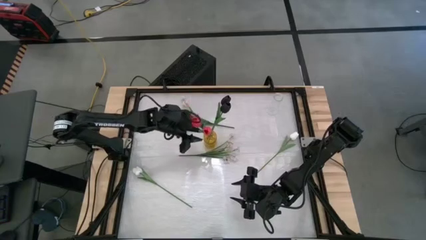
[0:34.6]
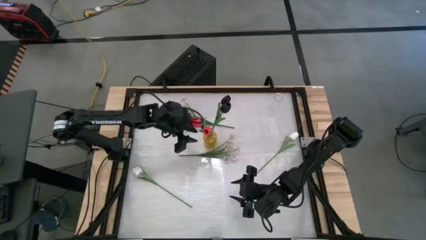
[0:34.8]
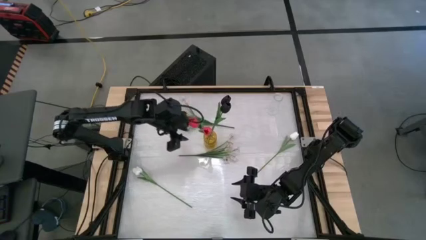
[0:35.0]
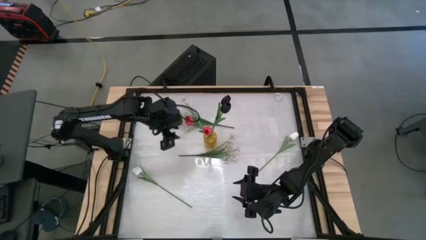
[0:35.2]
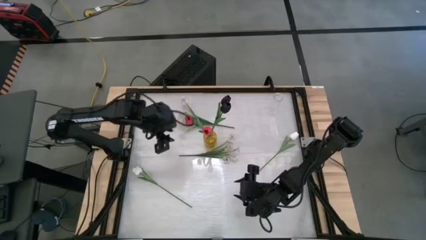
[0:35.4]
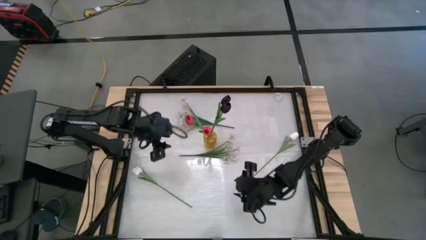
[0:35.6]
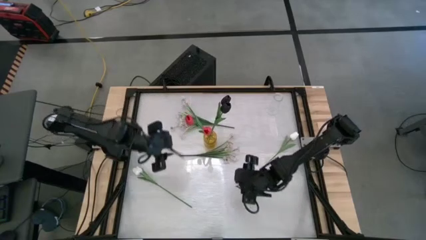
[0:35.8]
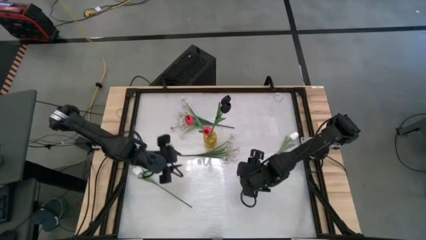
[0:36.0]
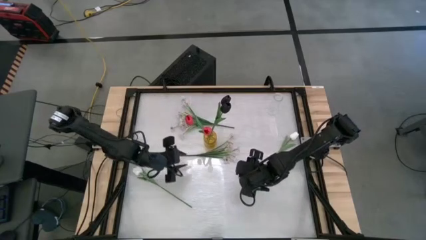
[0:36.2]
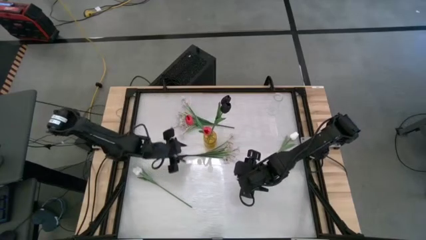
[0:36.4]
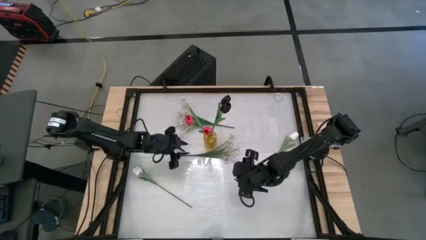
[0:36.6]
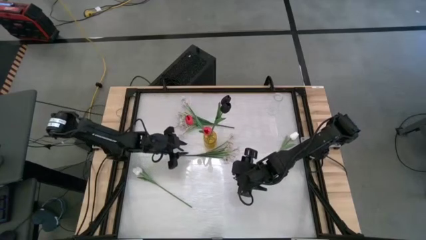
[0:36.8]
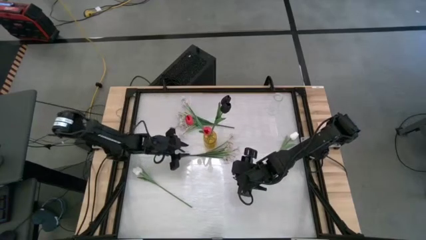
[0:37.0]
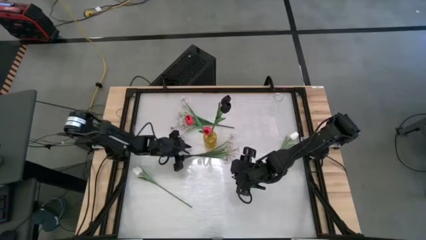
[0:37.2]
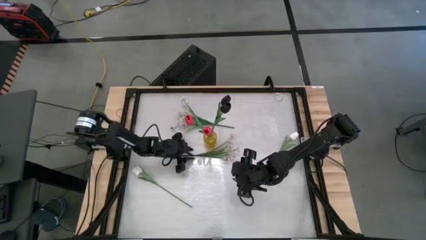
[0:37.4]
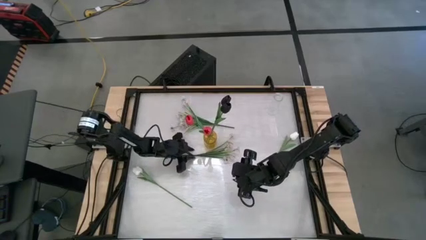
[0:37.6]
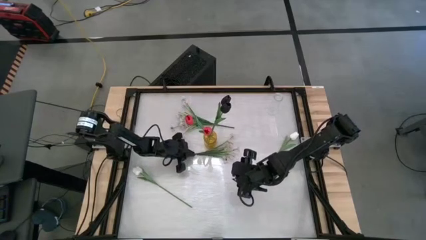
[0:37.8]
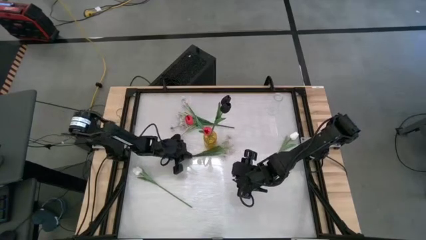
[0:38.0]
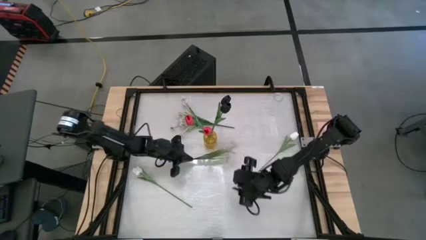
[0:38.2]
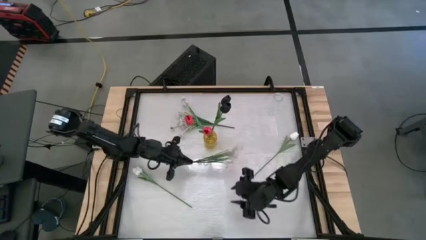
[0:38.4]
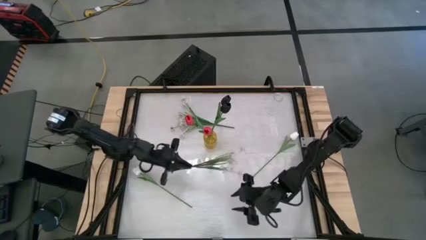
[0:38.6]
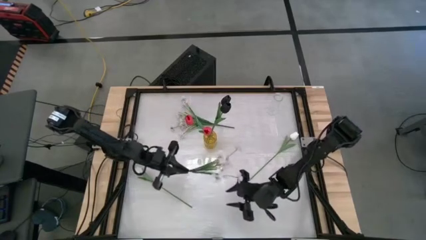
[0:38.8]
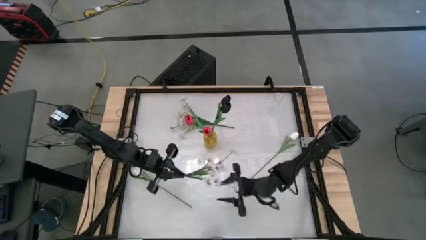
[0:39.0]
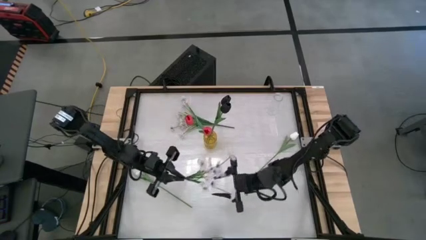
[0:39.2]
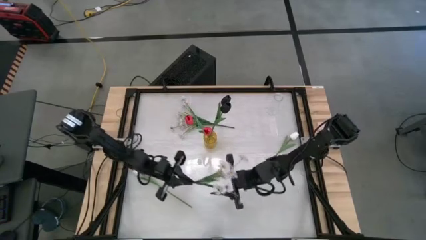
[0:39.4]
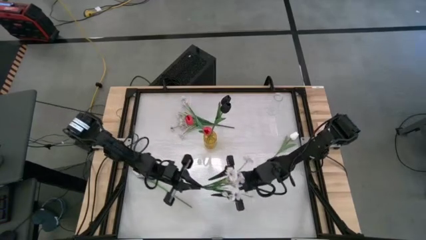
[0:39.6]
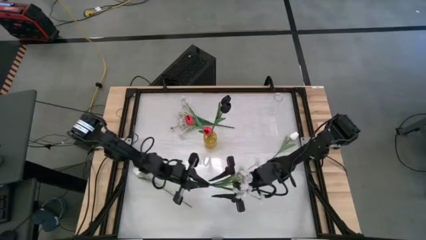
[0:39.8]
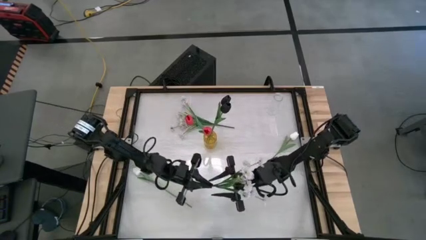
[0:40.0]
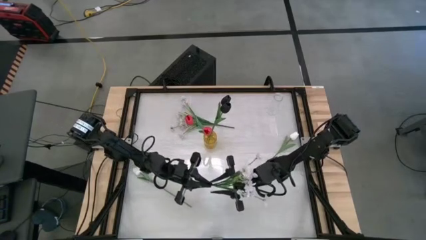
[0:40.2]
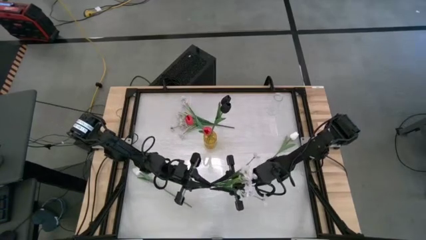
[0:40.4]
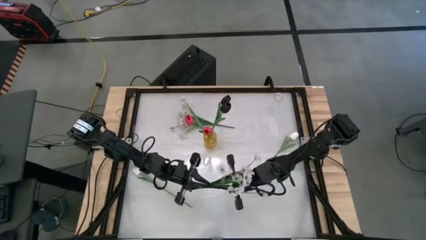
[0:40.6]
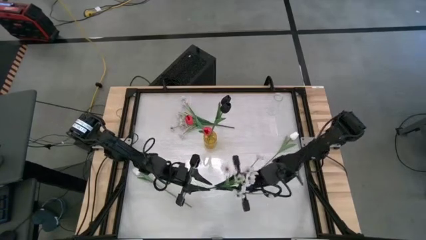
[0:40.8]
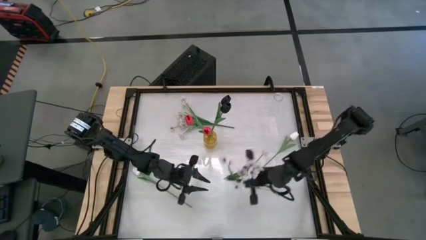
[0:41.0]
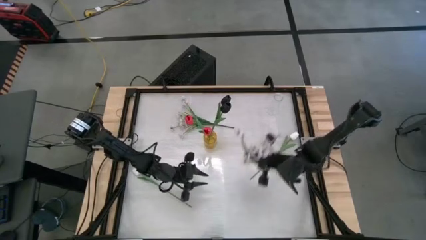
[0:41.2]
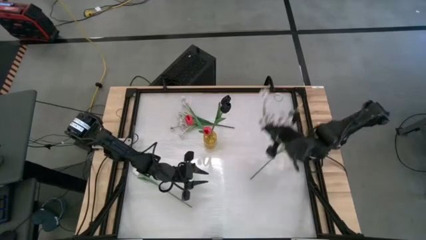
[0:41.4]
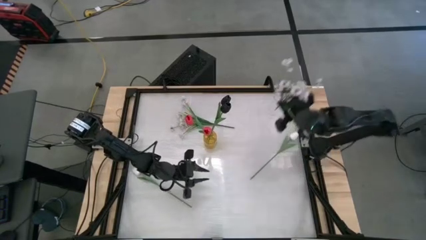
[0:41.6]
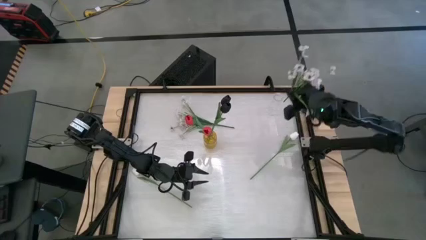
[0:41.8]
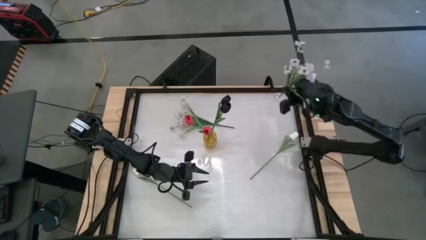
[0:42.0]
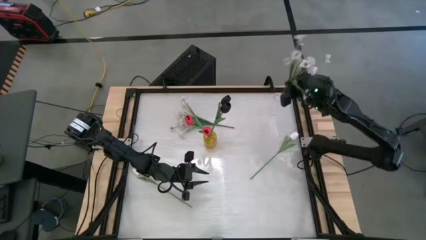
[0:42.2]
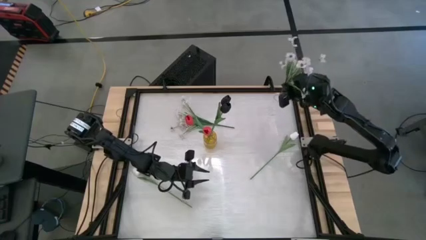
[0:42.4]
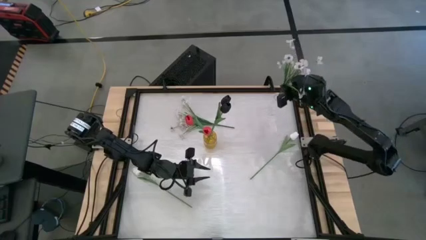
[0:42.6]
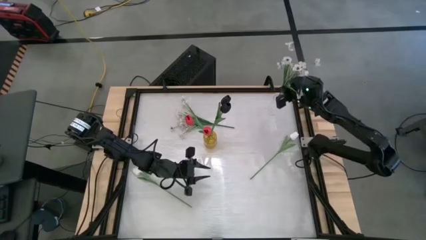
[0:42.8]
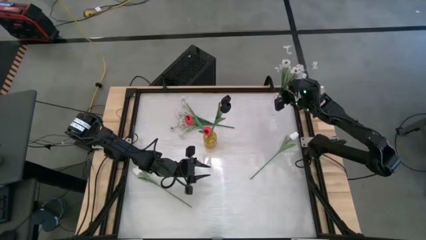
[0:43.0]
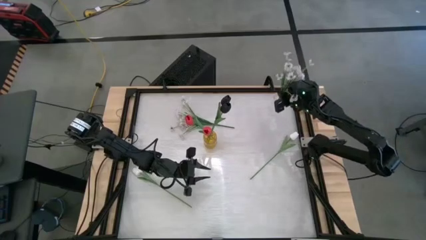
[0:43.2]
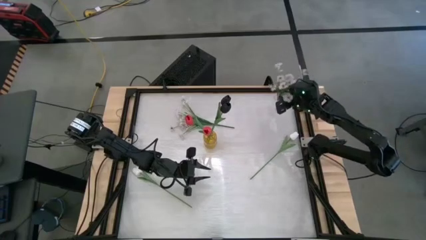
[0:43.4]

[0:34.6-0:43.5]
Task: Sort flowers into vase by color
Put the bottom white flowers into the transparent flower vase

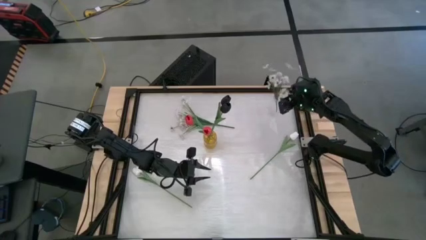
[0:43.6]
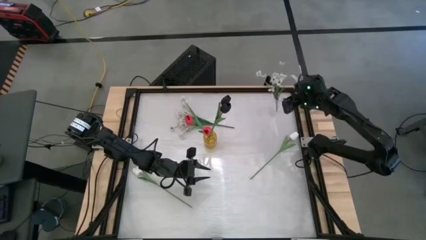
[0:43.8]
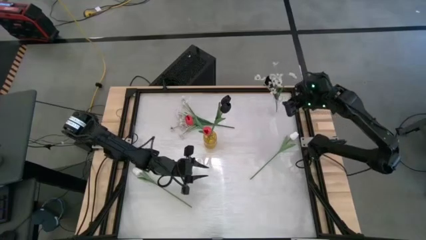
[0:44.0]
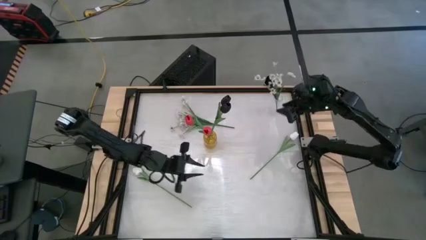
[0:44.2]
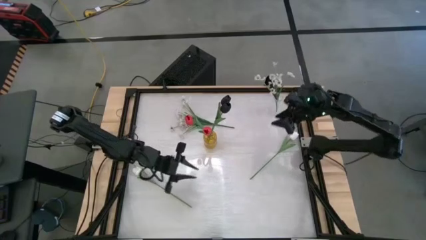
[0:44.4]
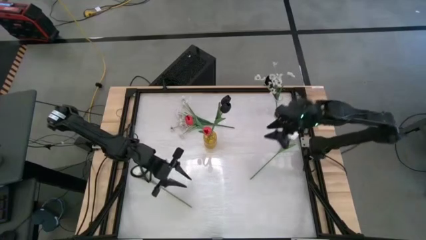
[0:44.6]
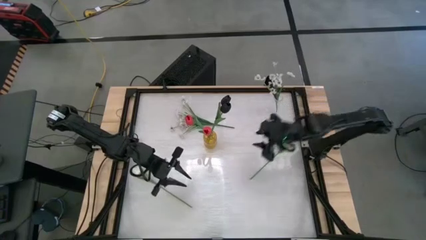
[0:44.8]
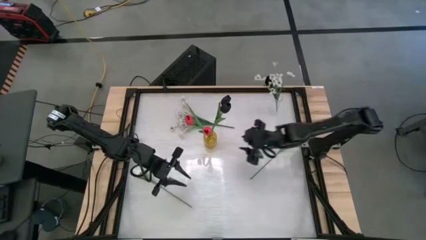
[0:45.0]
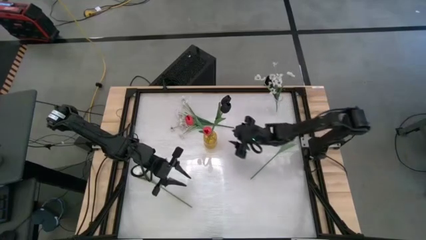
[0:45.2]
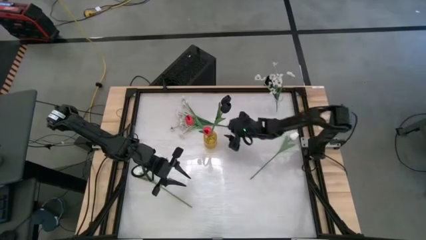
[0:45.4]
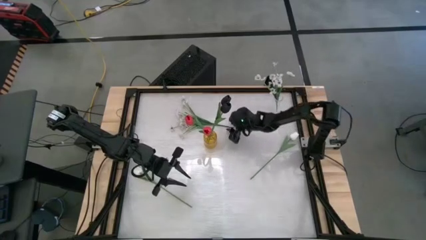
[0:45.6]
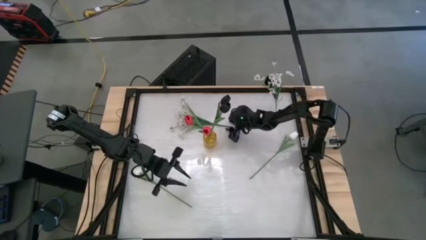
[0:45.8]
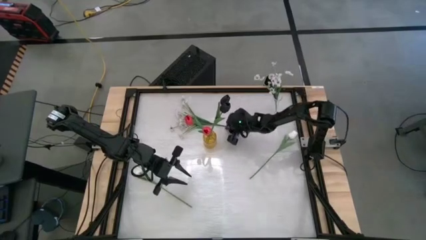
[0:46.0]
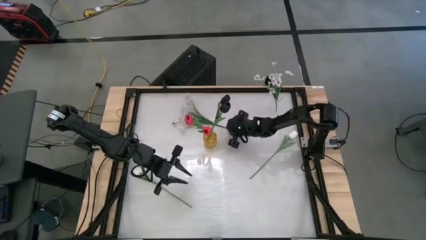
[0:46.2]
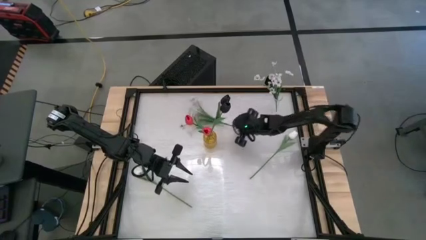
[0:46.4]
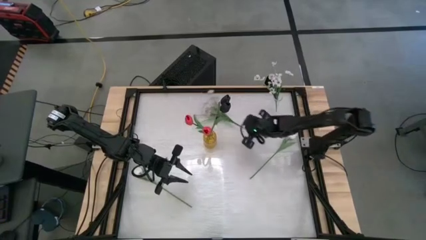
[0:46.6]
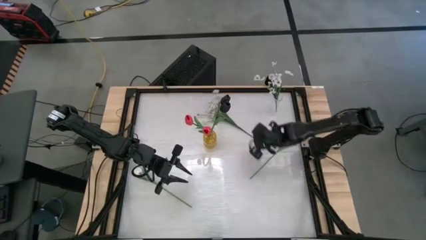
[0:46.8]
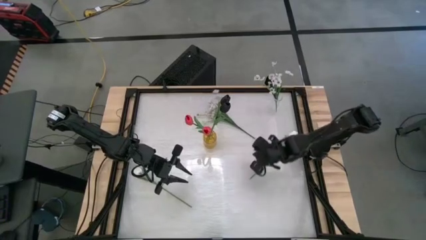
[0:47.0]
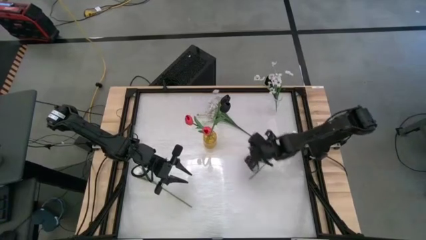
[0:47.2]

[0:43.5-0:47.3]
Put the white flowers into the transparent flower vase

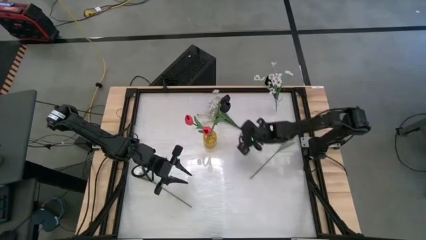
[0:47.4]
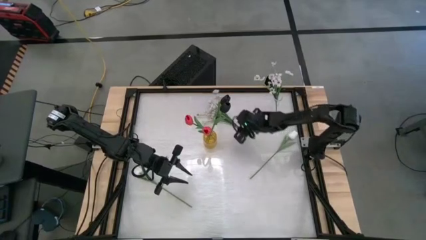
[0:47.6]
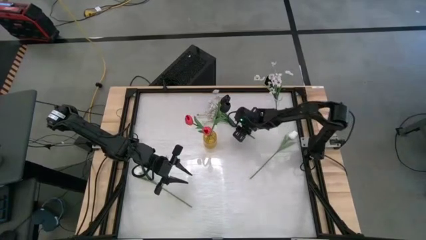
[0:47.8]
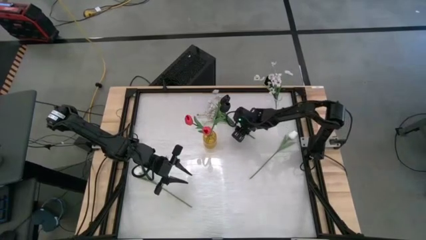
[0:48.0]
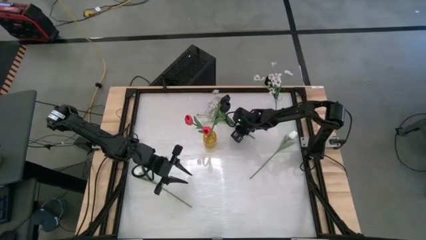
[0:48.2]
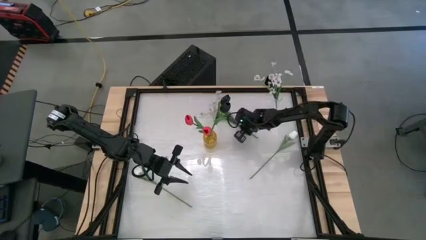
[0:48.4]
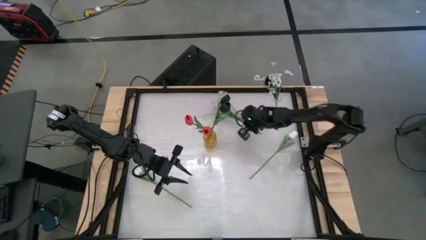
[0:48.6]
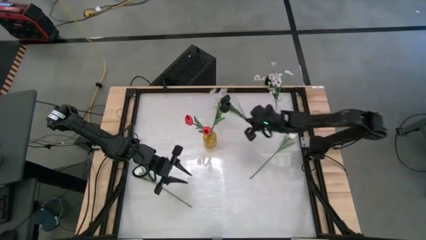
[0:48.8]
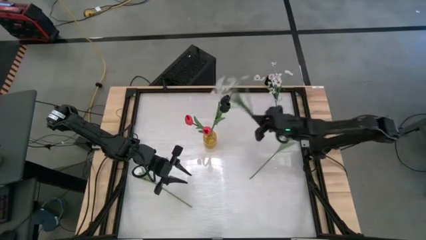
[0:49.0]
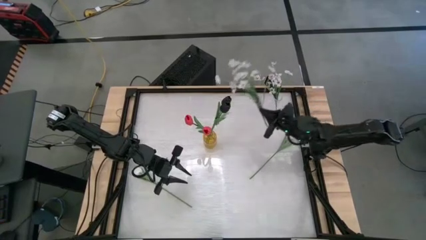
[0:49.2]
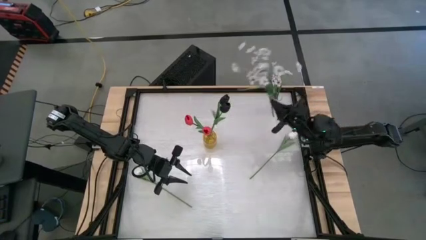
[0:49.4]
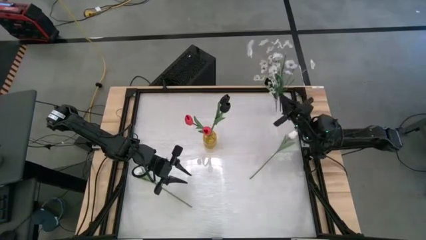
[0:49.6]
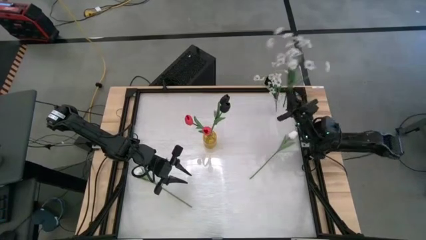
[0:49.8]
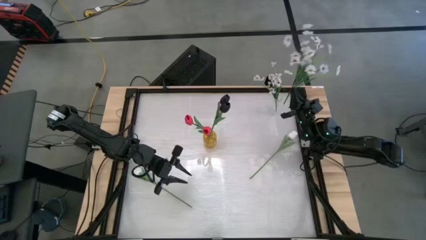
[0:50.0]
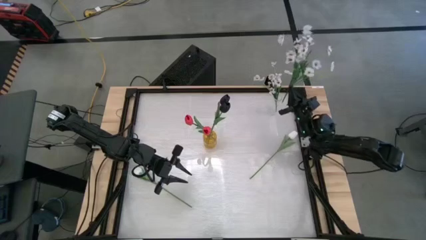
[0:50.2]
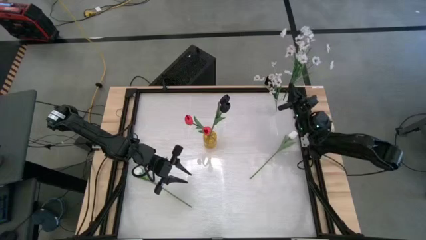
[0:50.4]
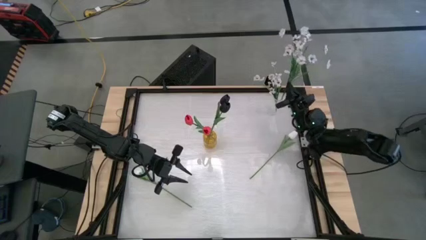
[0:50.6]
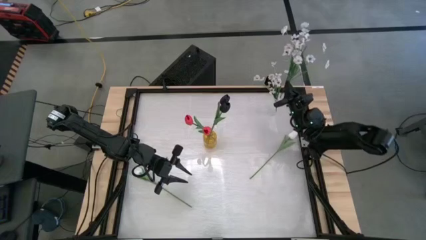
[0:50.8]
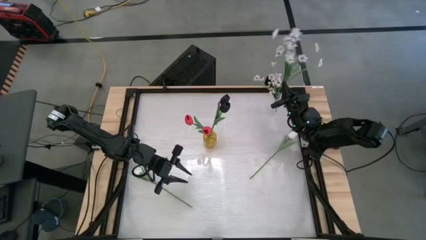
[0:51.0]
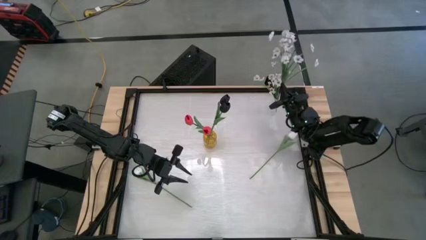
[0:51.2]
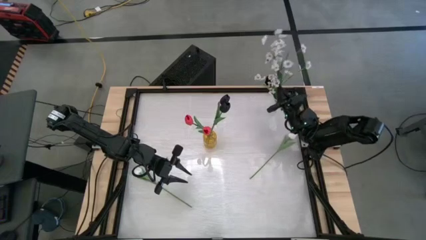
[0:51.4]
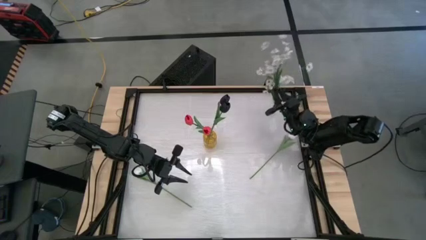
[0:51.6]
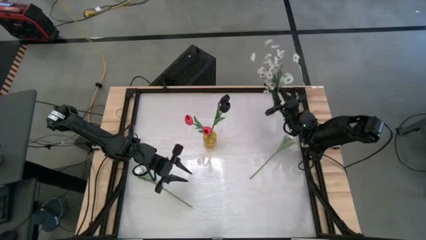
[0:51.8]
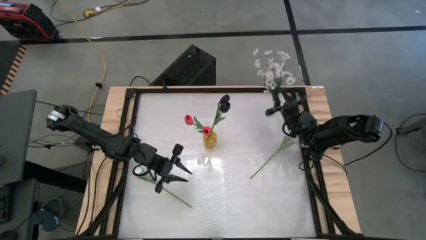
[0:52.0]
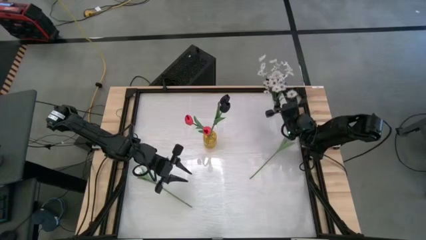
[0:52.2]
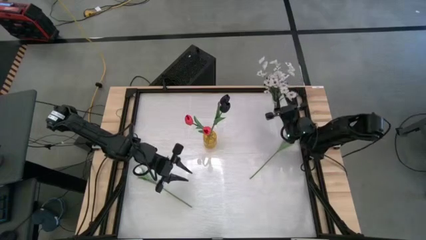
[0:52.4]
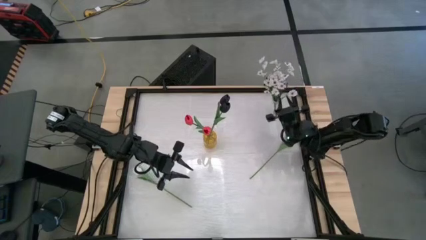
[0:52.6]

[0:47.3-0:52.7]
Put the white flowers into the transparent flower vase
